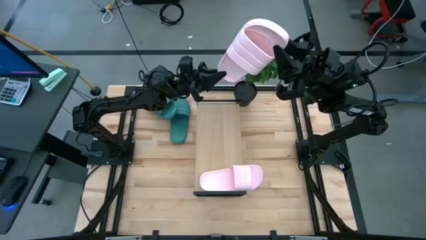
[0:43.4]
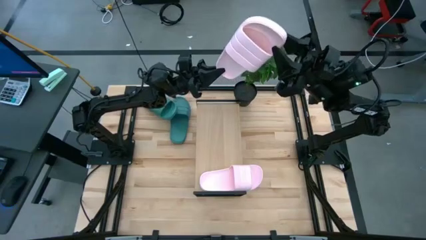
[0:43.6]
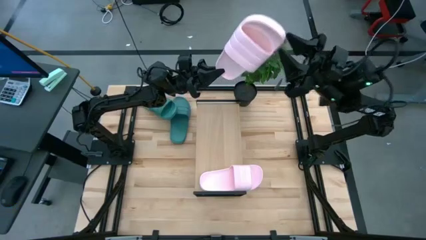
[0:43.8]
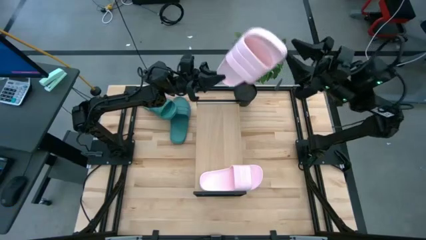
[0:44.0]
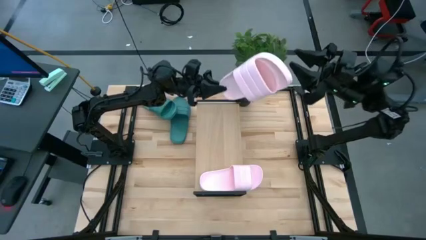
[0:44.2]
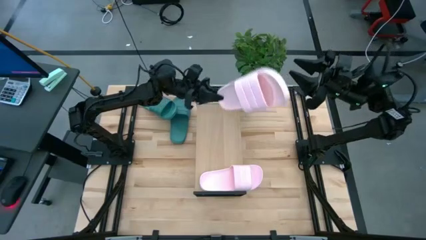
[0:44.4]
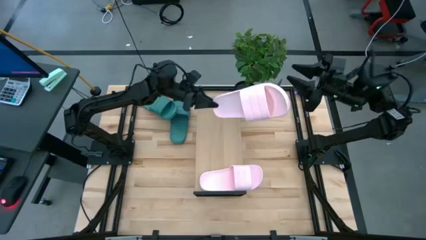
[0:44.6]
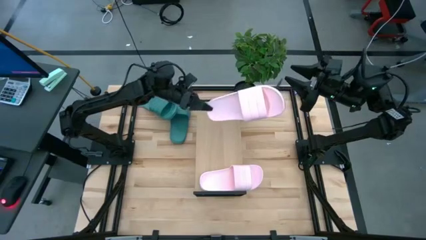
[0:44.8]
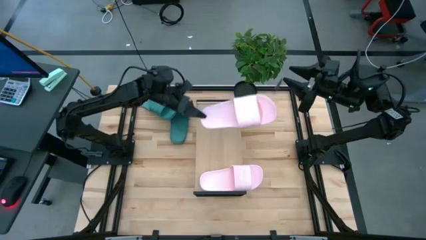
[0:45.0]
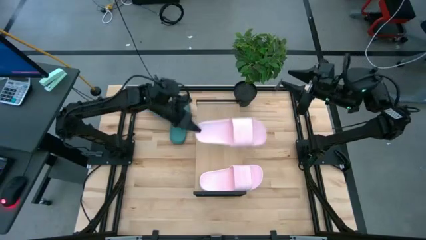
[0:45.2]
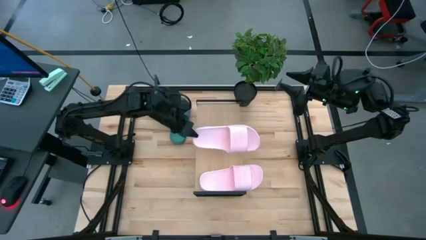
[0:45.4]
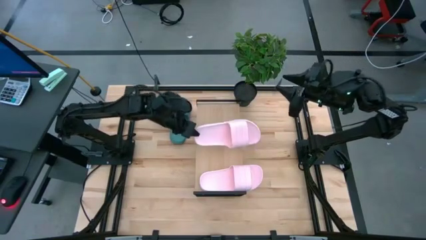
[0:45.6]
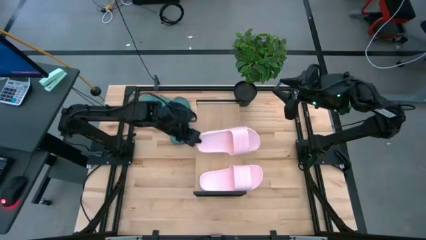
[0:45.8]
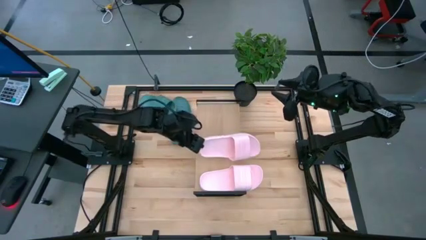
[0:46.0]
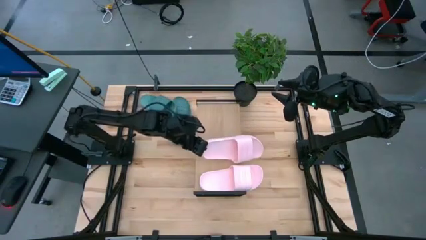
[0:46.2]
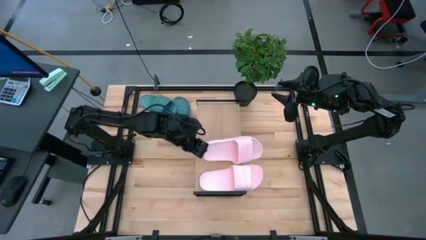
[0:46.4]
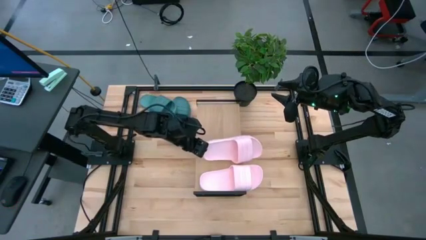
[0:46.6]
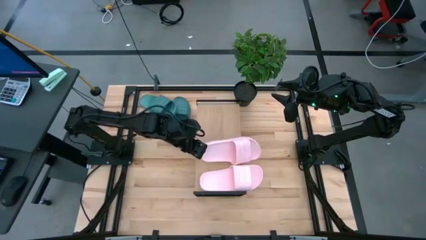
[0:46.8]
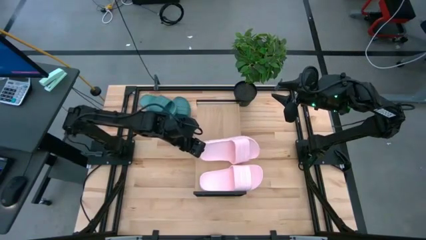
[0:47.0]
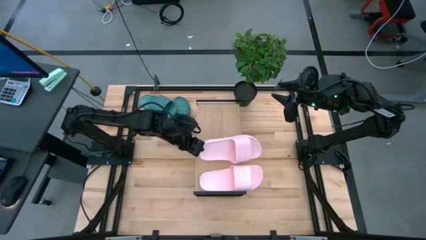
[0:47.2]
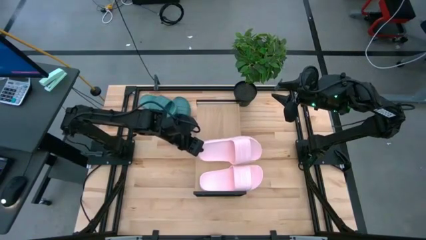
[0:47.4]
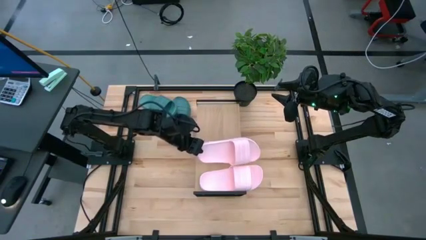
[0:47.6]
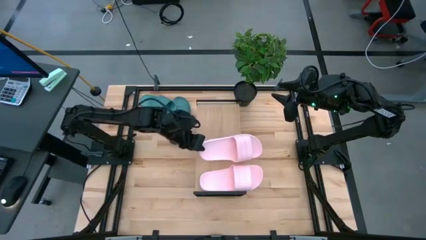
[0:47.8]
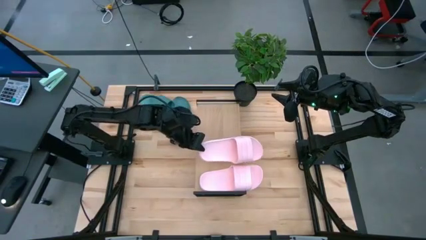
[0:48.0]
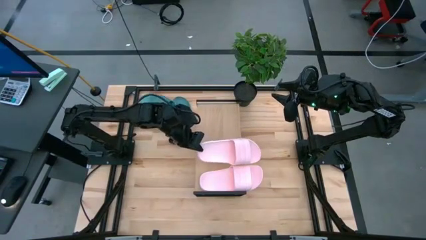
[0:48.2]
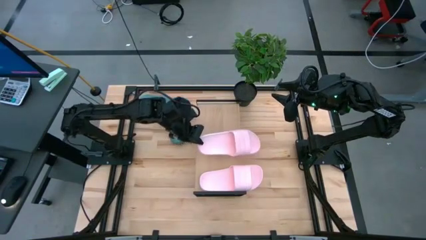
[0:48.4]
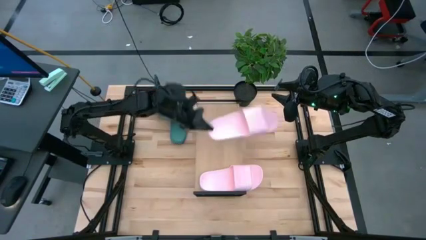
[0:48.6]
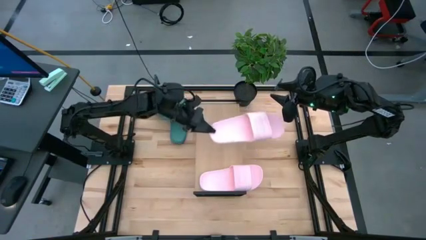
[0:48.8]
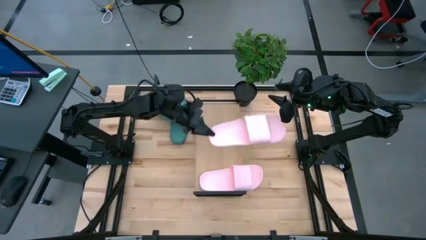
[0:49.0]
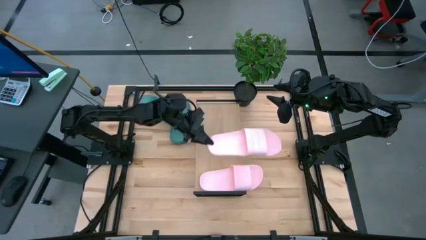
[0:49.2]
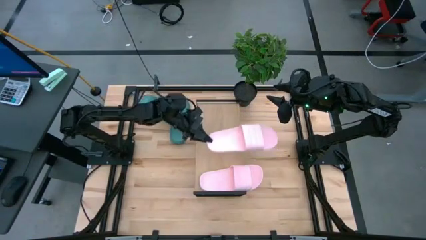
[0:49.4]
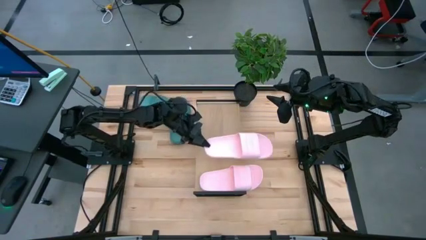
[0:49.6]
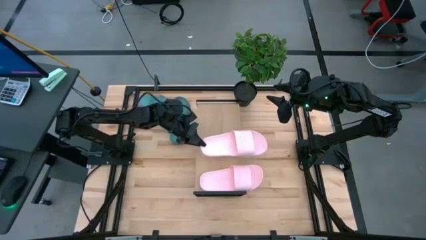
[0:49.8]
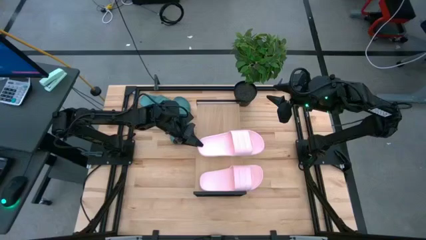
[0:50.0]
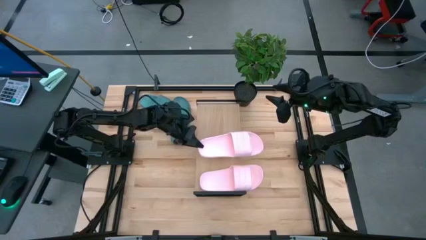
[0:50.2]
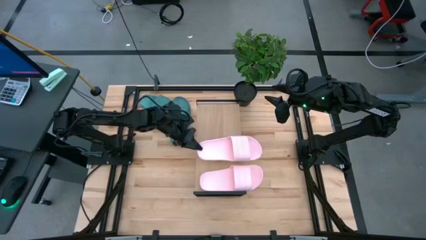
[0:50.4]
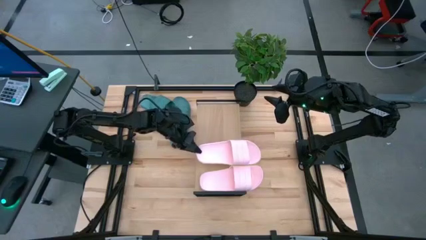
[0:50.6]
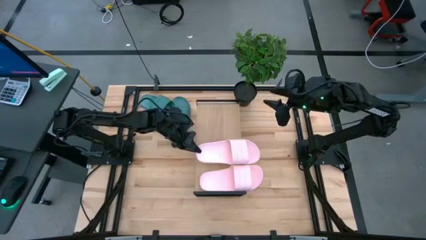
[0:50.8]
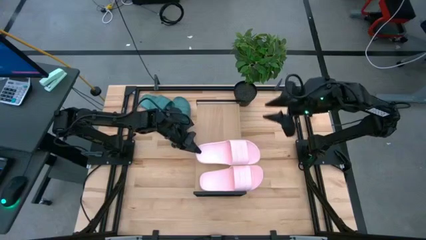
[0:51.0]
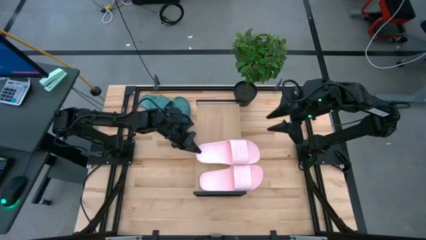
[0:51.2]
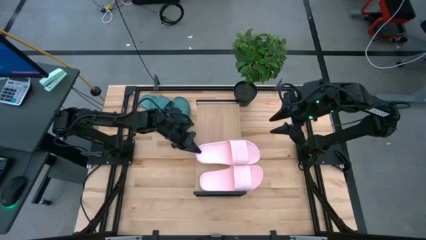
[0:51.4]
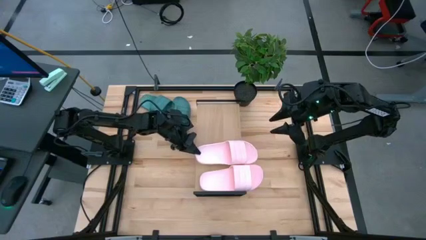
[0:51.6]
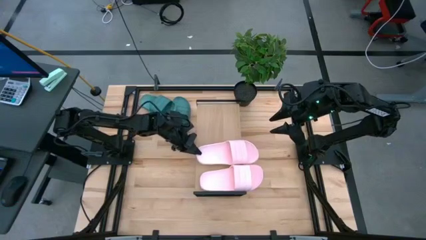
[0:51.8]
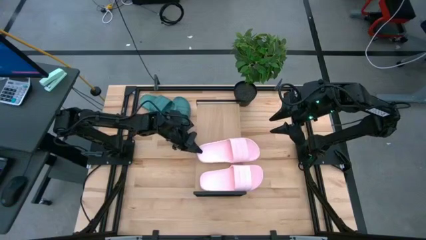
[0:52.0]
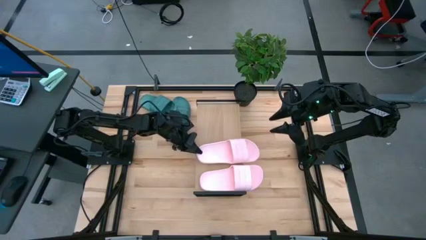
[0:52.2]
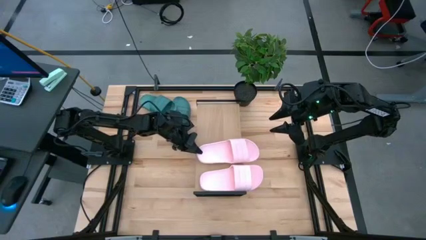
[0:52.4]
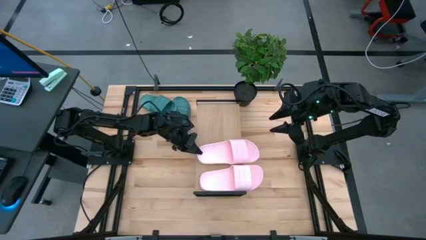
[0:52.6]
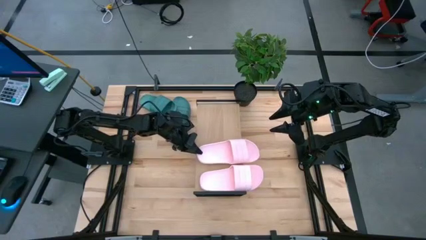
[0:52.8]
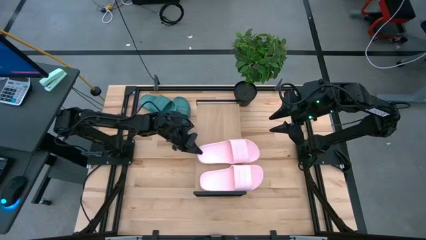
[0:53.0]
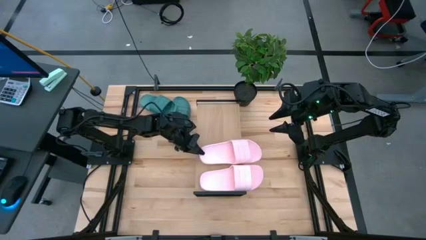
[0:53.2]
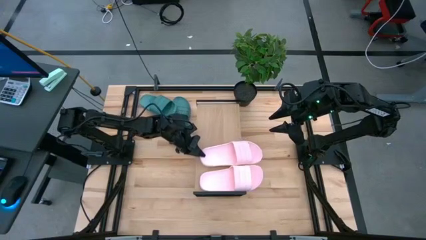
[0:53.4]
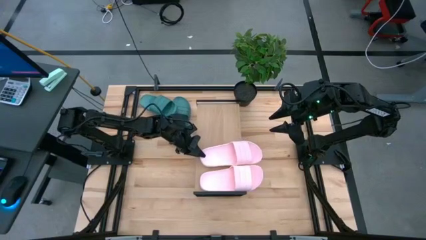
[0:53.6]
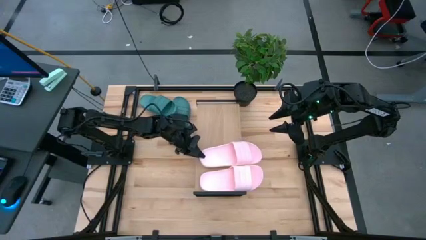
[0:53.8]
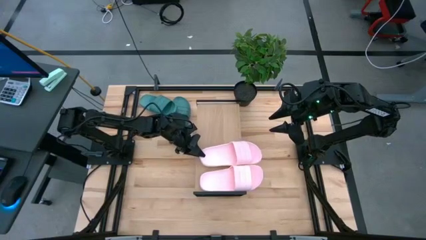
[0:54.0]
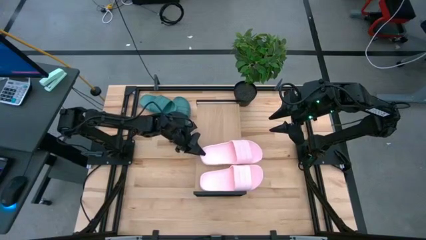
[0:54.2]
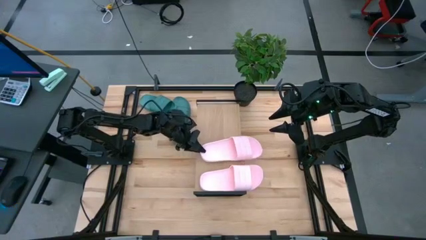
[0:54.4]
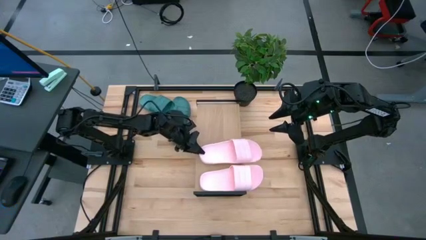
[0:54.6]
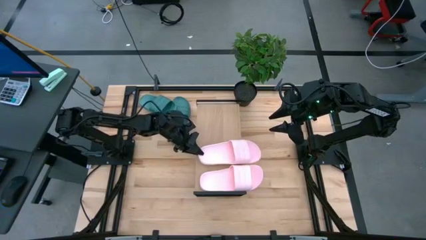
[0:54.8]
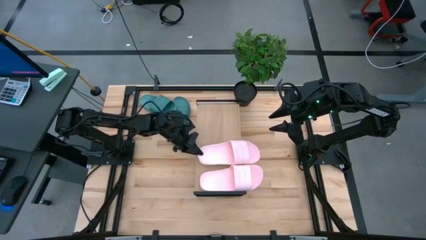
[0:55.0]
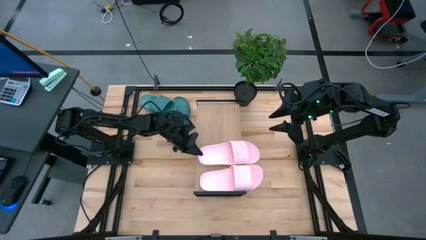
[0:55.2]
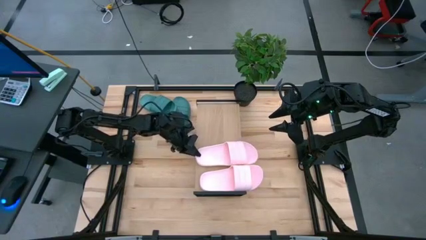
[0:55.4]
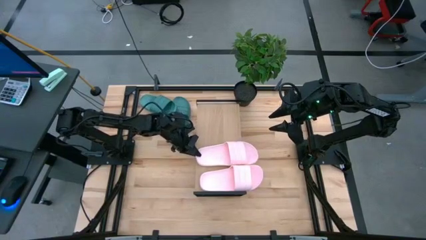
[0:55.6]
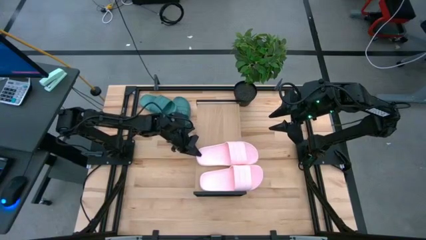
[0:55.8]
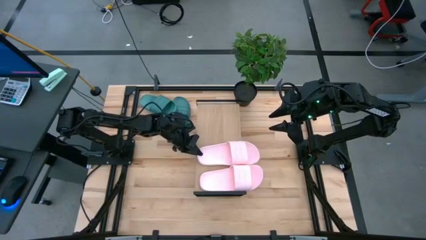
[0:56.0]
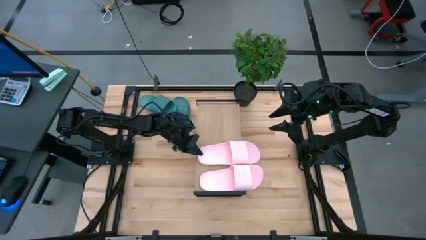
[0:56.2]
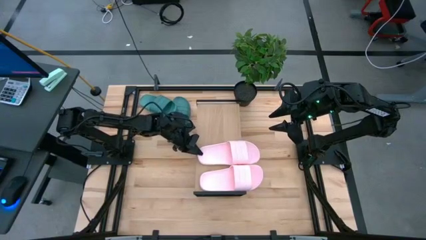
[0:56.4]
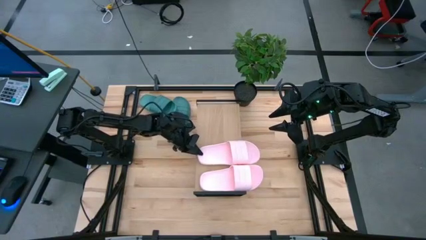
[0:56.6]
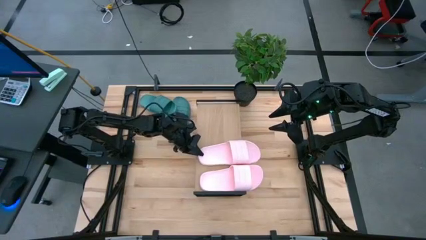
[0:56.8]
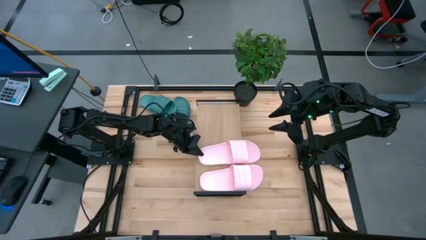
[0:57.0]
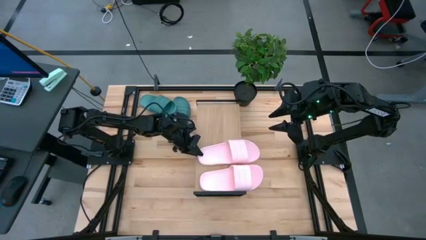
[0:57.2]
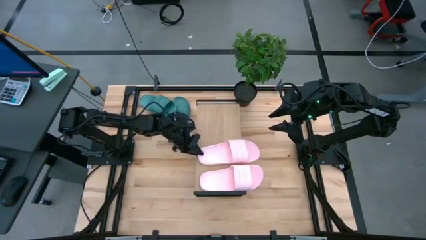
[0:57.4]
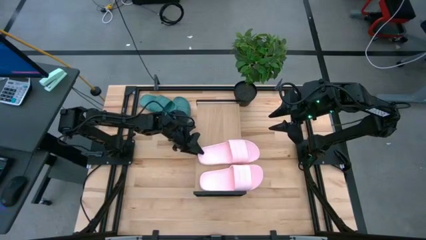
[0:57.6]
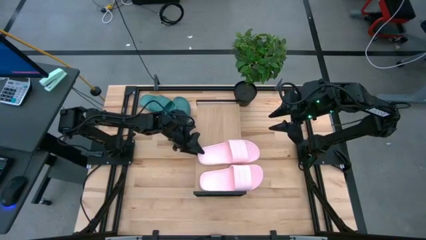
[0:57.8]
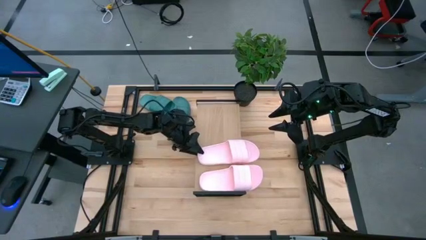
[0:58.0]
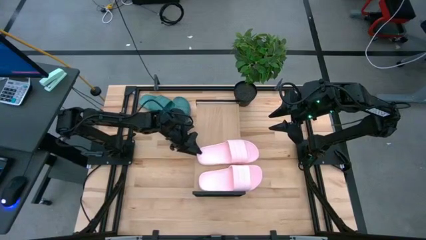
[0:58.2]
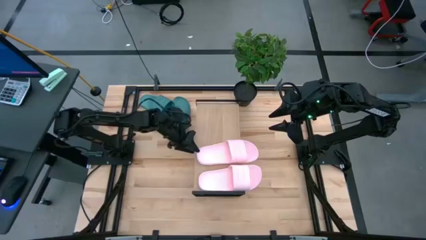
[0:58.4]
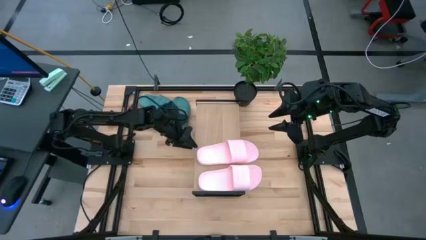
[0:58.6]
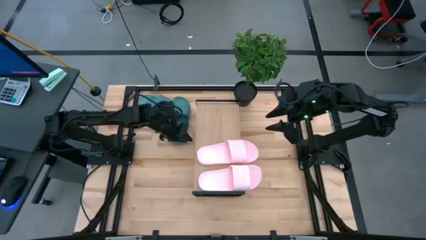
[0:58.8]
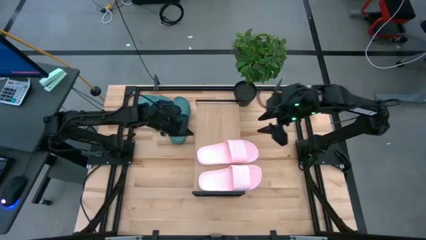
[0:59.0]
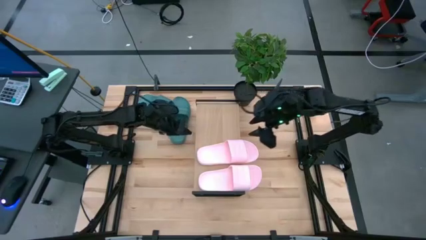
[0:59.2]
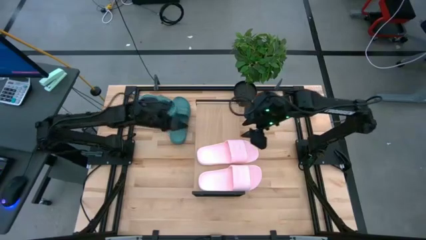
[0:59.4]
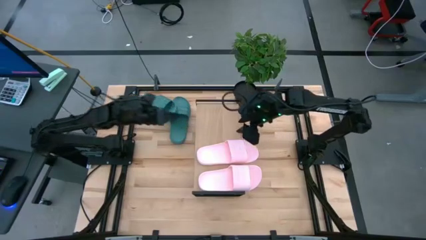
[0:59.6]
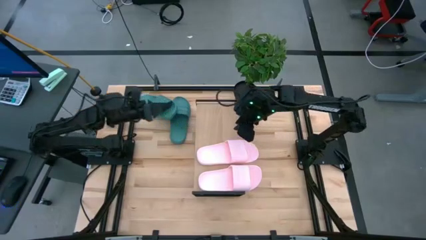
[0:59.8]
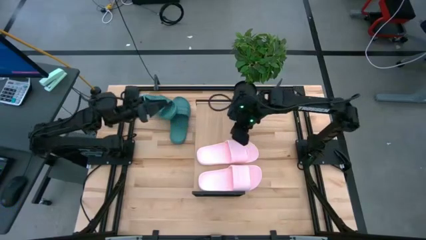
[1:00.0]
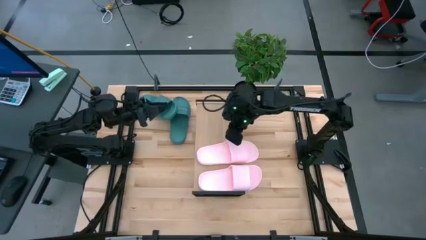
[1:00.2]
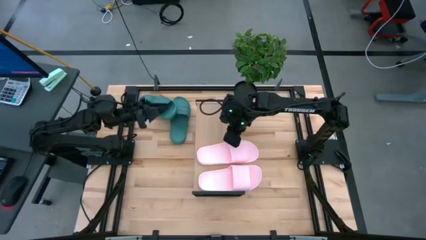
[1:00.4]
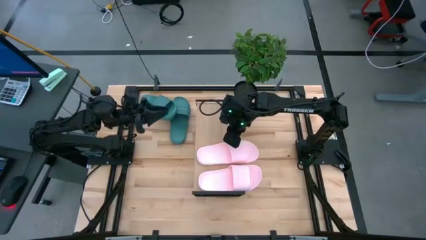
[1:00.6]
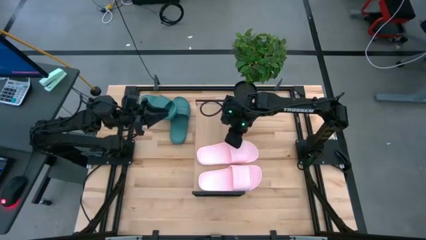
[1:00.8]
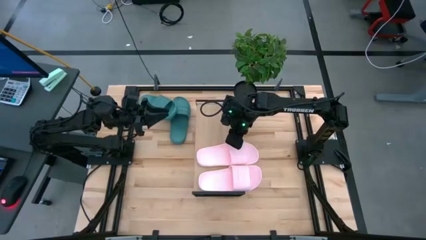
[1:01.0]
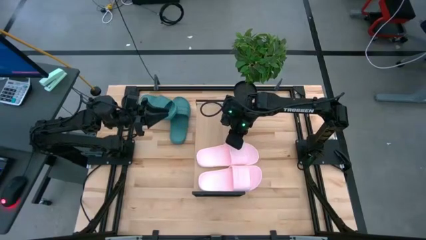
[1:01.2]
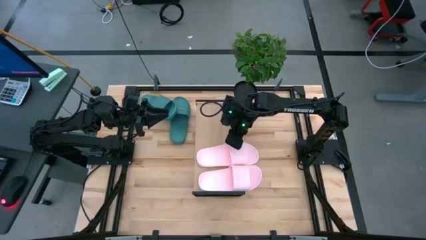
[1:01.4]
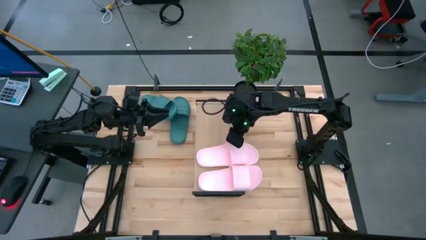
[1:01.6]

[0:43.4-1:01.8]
Task: Pick and place slides into the shelf
Put the pink slide on the shelf
